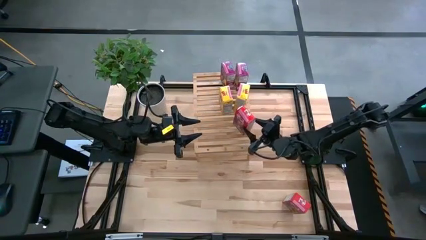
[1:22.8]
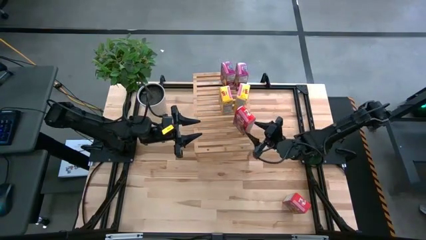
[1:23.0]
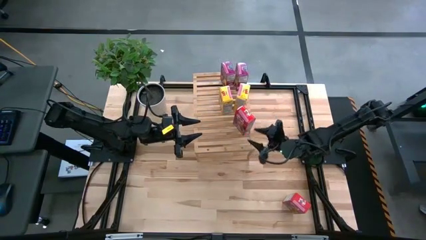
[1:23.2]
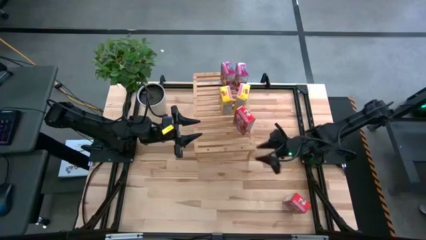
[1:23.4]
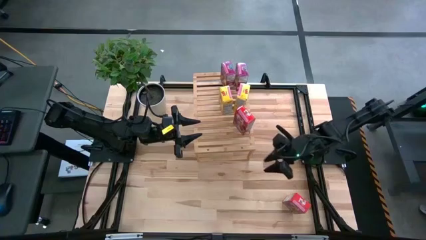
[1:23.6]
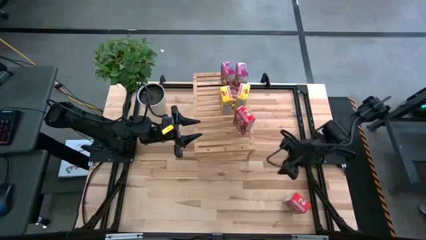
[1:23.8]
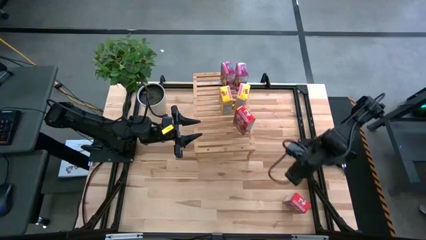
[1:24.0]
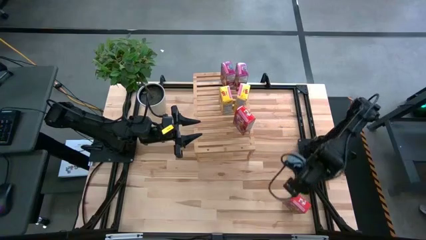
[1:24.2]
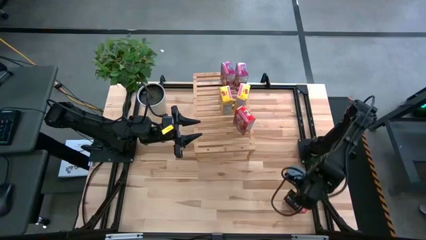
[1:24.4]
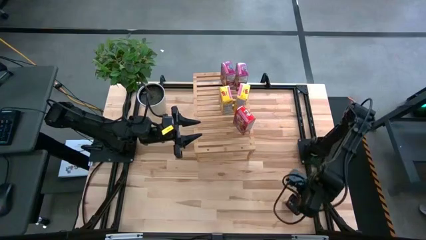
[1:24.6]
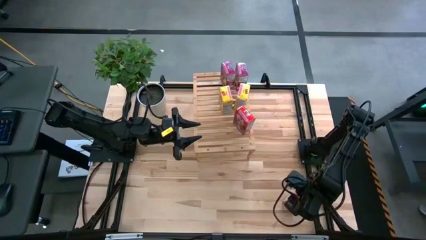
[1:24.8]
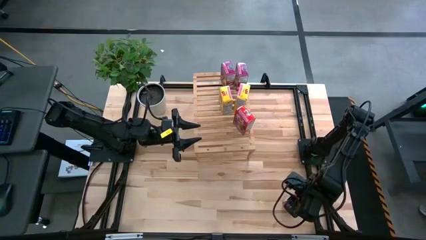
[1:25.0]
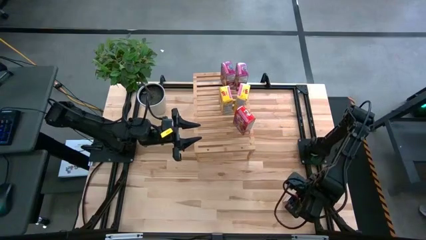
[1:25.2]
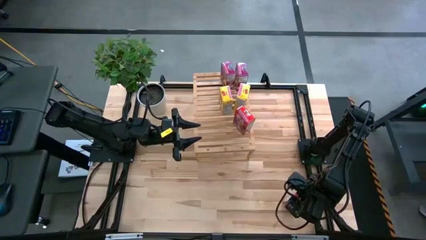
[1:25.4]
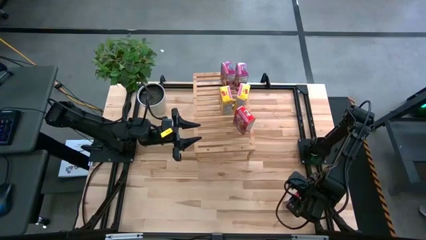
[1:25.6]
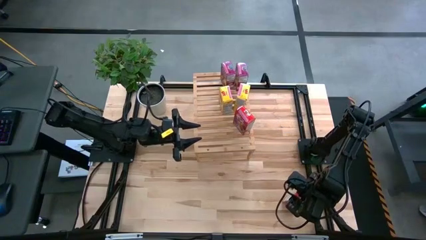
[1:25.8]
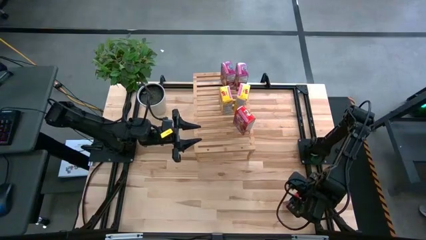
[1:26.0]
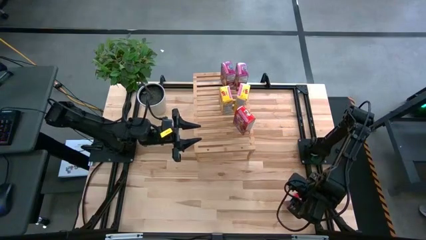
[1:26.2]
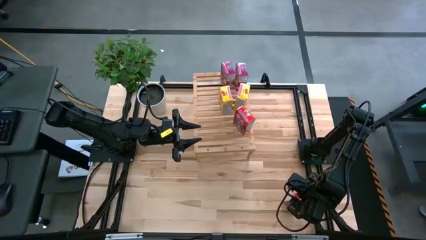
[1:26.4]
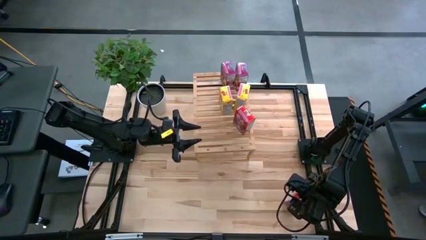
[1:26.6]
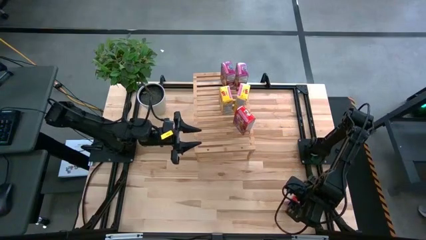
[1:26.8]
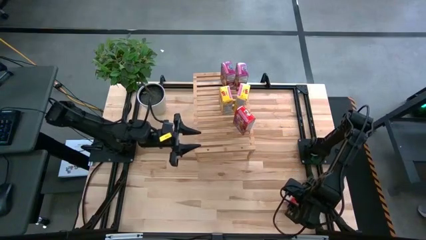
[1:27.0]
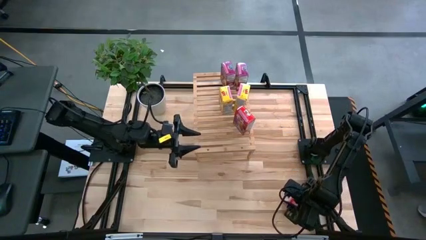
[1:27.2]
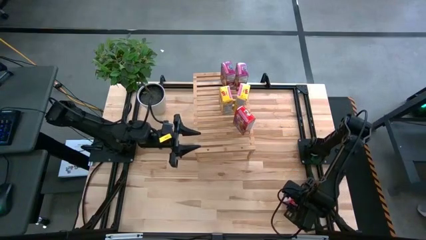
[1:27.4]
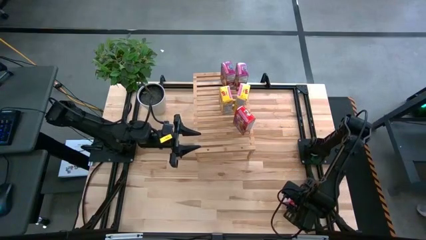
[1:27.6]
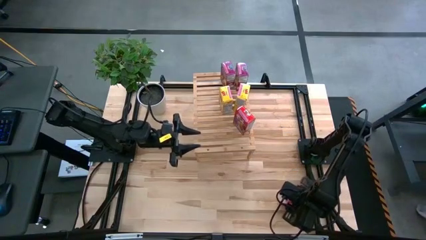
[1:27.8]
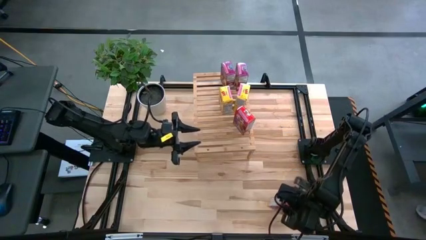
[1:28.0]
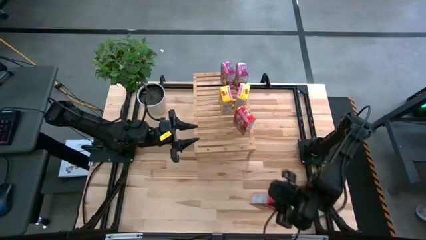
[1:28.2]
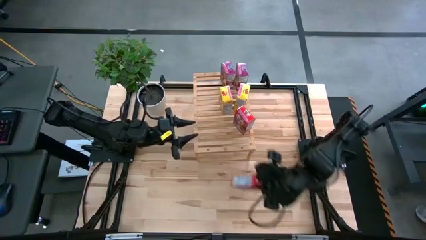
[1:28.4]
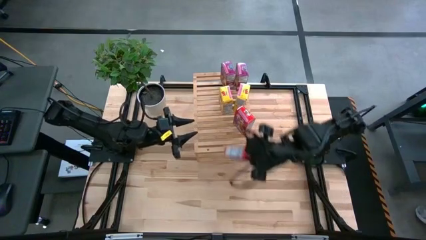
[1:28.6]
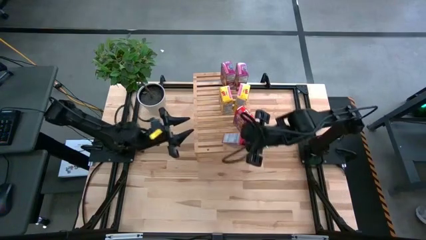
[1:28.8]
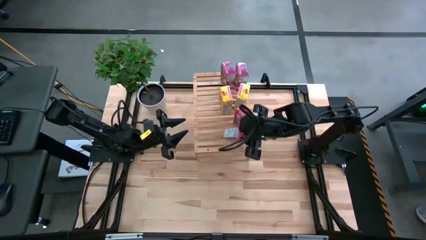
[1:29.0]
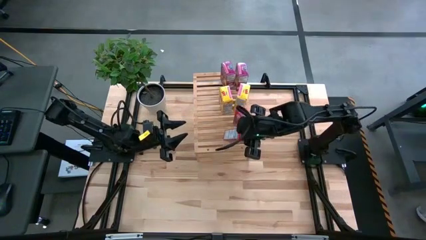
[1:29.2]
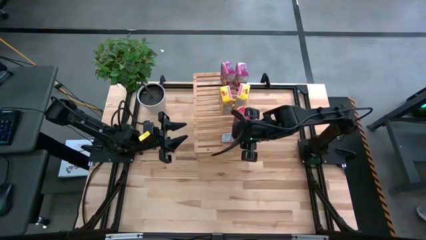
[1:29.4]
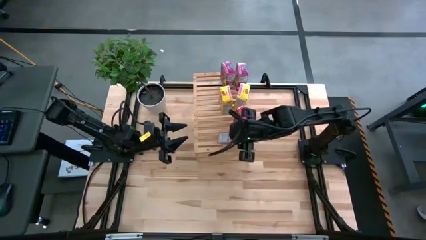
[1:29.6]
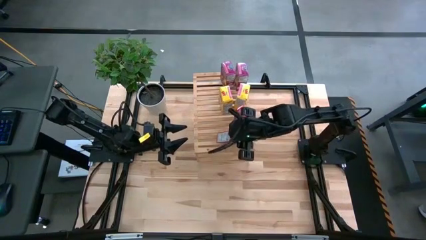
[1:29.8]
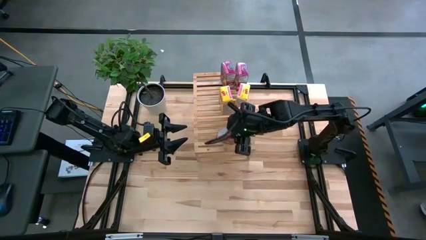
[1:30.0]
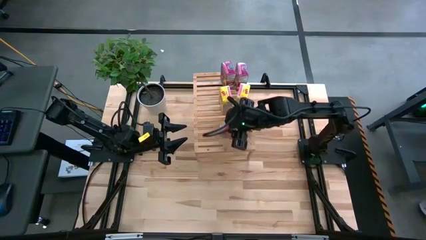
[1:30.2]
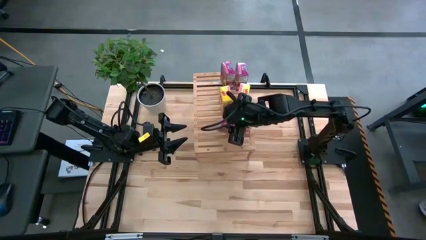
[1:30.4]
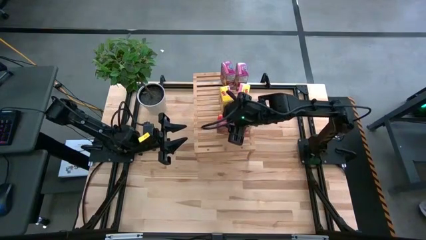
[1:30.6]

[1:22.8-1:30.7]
Task: Stack cereal on shelf
Put the red cereal box on the shelf aligned with other red cereal box

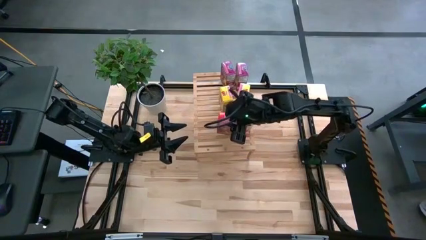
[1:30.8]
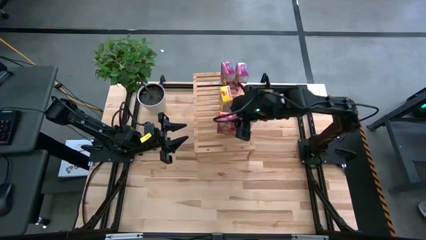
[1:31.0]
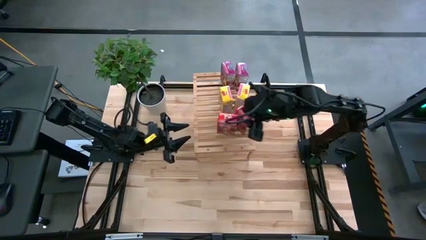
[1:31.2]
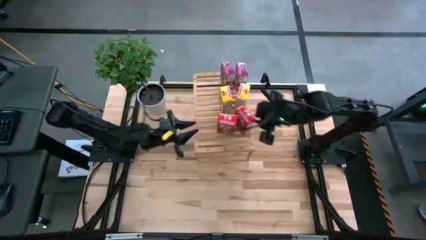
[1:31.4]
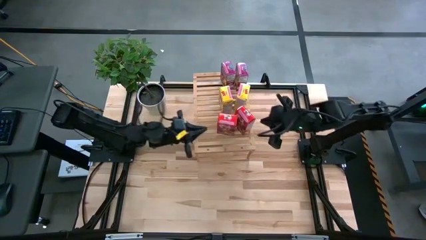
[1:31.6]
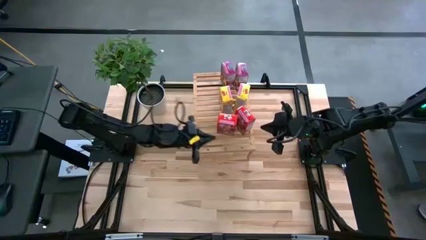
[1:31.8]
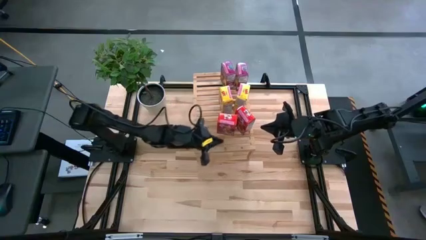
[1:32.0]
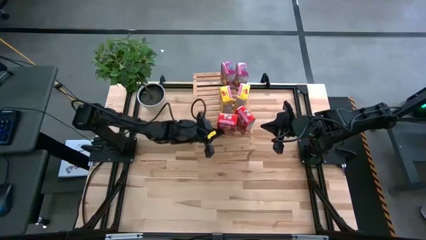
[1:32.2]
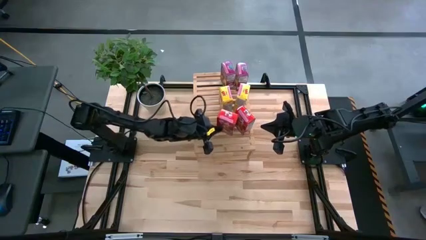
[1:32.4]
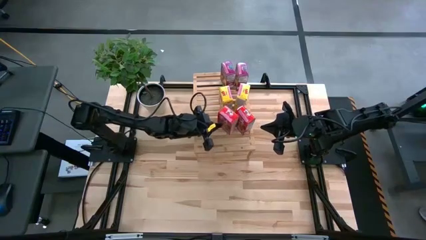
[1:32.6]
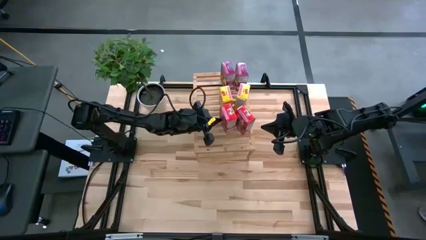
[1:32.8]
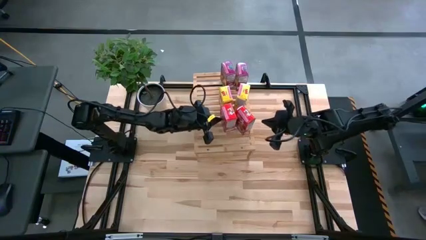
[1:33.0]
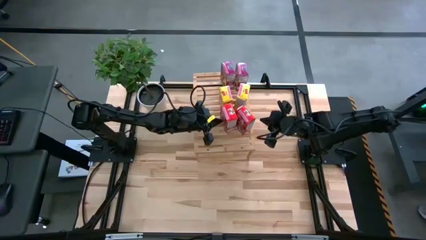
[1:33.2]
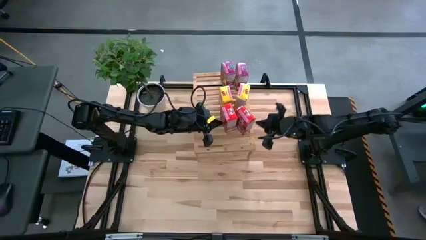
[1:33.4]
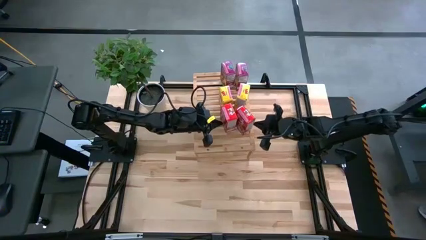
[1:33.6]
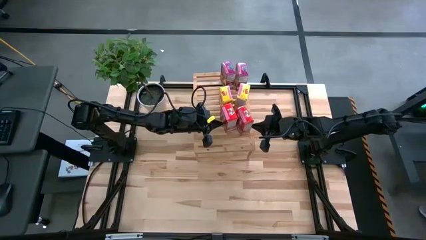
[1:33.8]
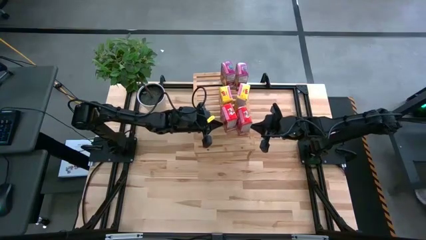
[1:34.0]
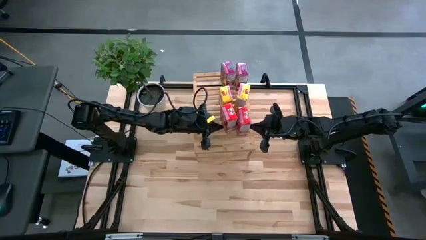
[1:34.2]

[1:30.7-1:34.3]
Adjust the red cereal boxes on the shelf

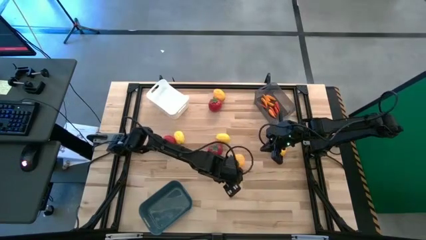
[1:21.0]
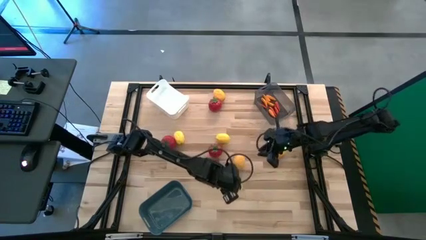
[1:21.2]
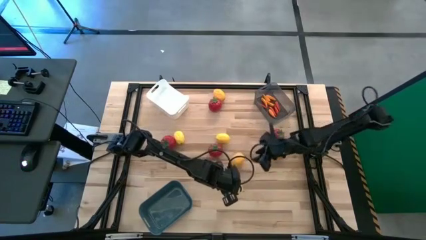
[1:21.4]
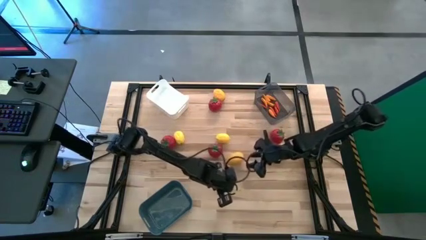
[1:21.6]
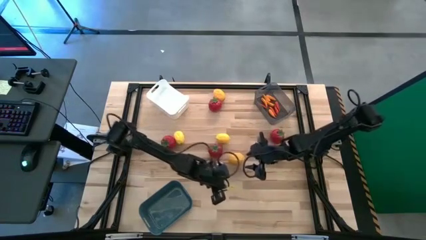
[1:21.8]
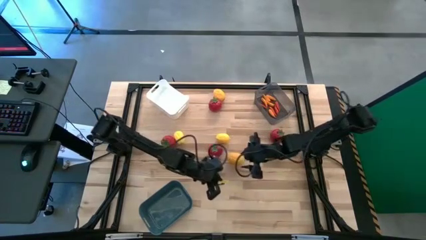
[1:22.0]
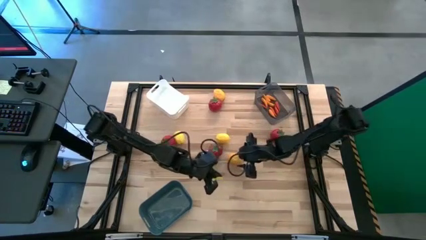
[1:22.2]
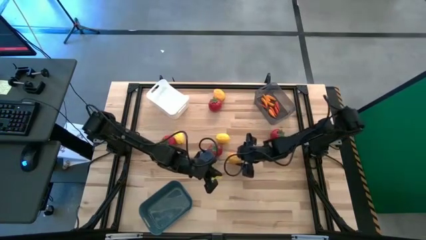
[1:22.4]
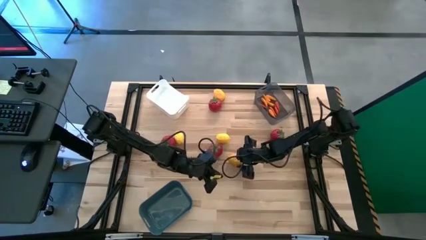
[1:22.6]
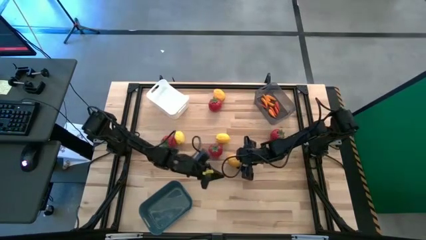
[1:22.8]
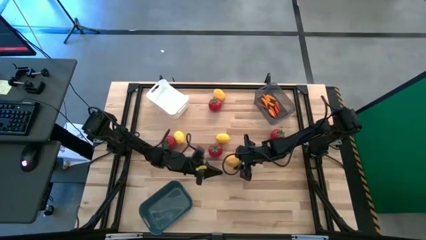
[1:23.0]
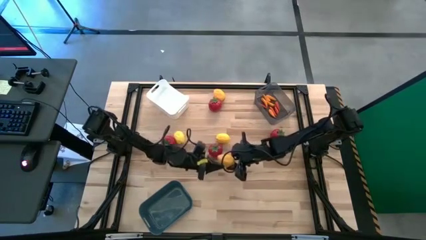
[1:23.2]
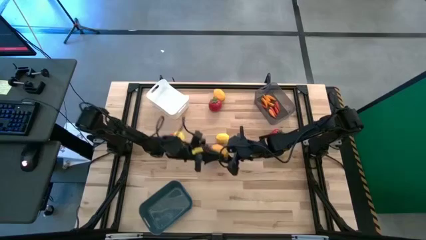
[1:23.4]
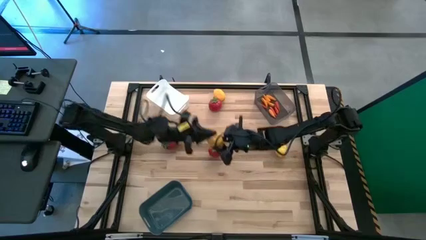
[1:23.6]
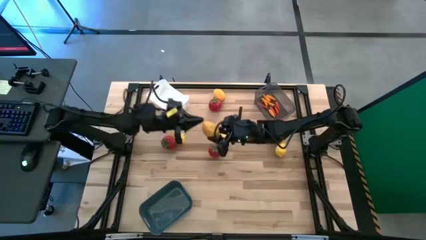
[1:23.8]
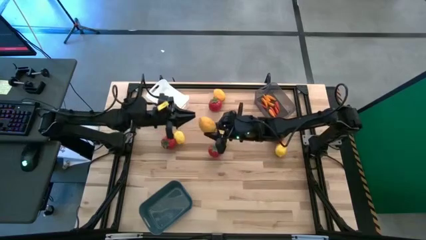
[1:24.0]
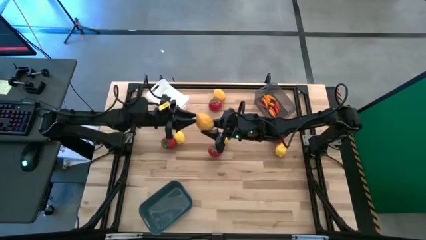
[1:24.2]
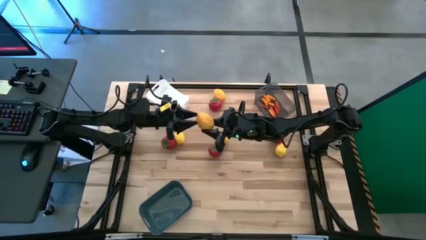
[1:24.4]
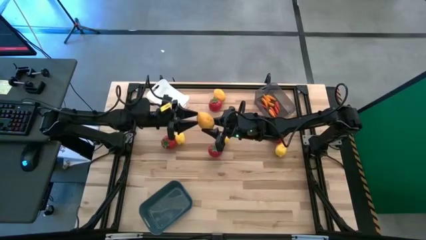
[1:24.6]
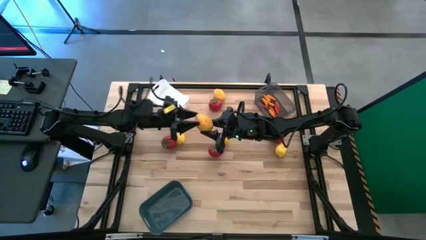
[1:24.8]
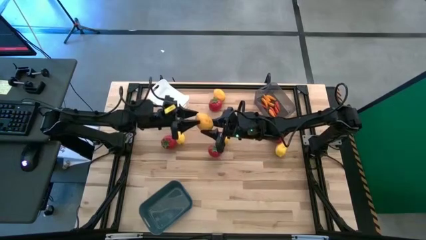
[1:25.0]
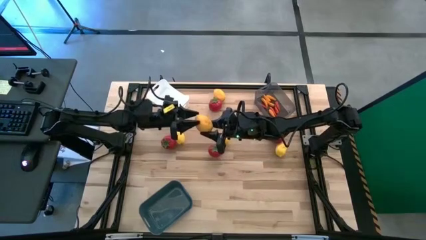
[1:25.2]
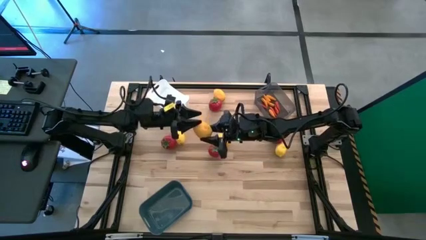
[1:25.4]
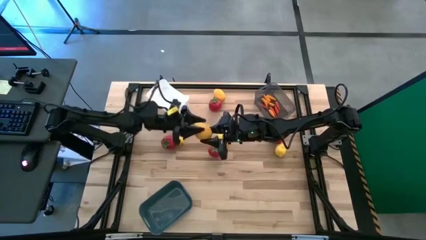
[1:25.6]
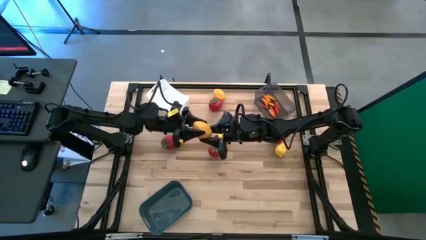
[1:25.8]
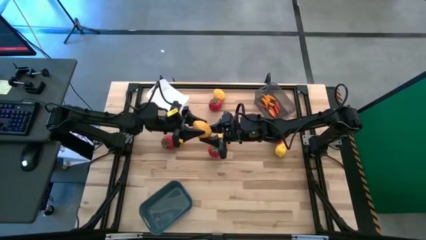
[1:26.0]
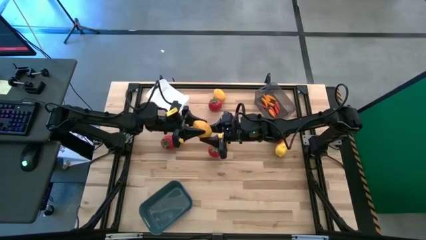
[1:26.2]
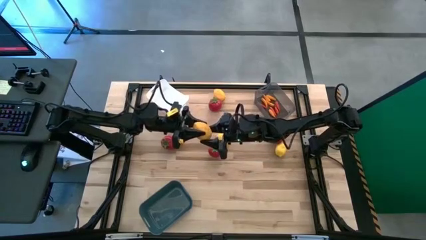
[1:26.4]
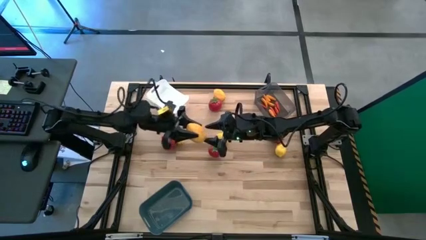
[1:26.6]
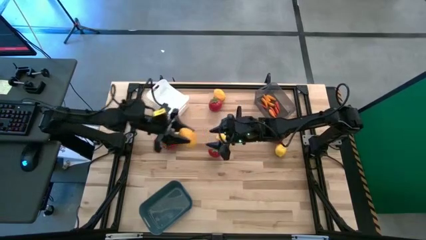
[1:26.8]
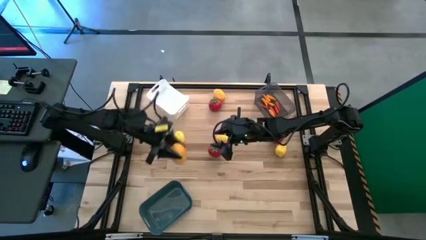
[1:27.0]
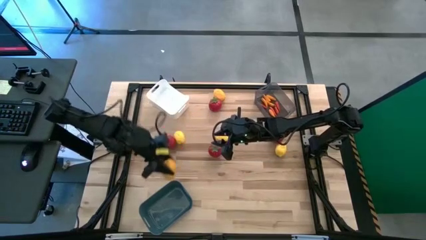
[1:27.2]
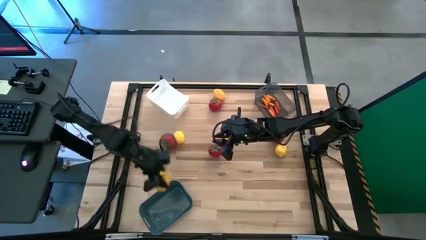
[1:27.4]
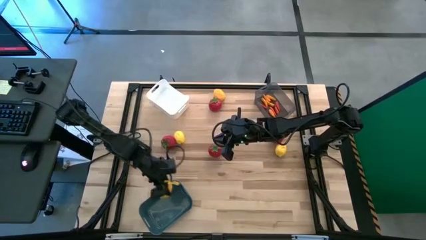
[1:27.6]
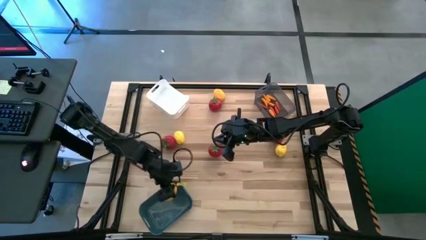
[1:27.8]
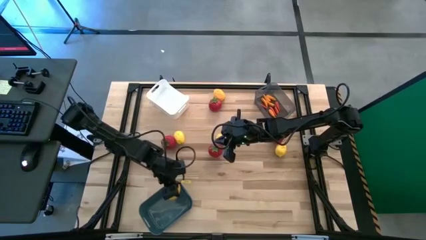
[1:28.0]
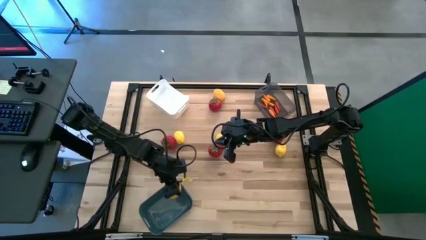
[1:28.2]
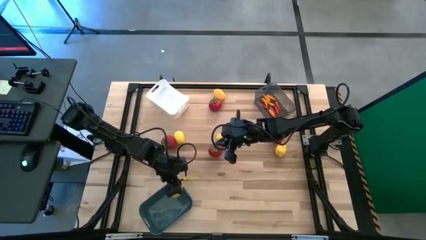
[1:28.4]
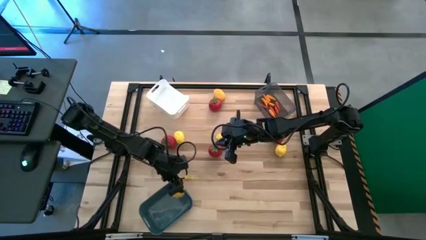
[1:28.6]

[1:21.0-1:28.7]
Task: Sort produce into baskets
Put the lemon into the blue bin
